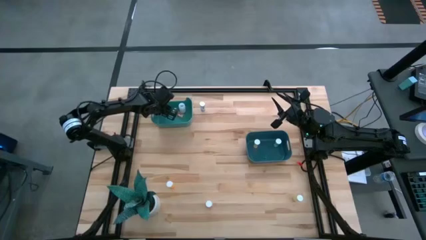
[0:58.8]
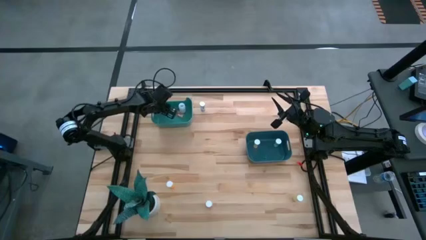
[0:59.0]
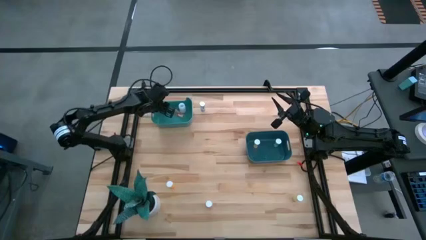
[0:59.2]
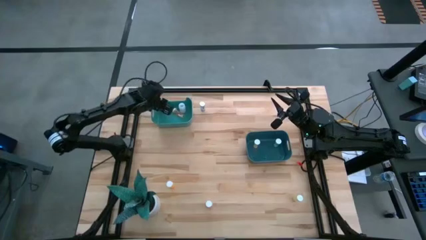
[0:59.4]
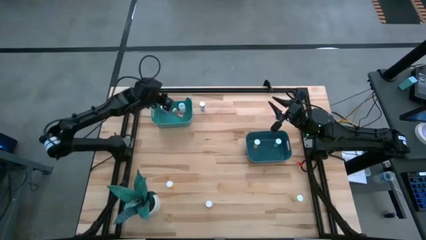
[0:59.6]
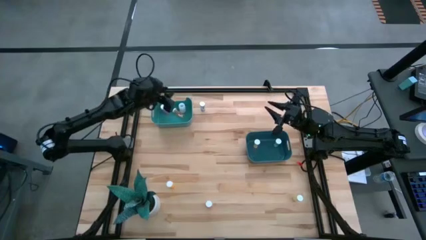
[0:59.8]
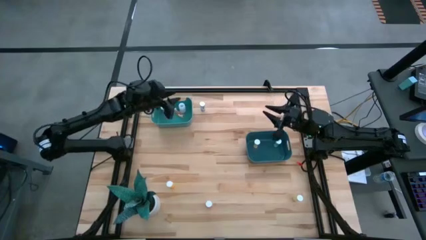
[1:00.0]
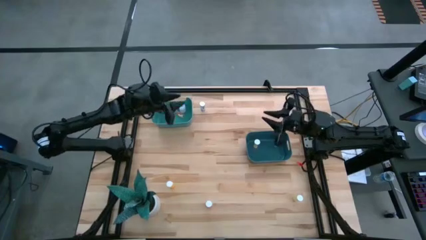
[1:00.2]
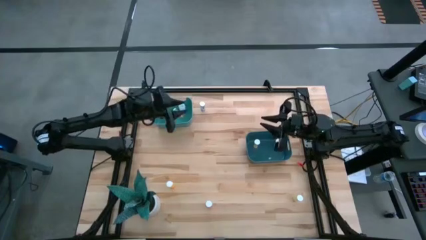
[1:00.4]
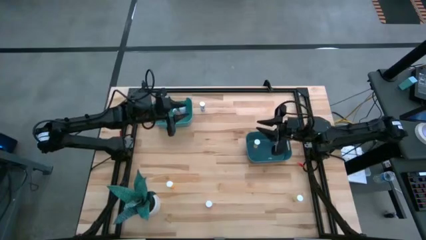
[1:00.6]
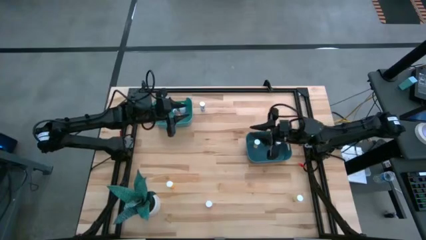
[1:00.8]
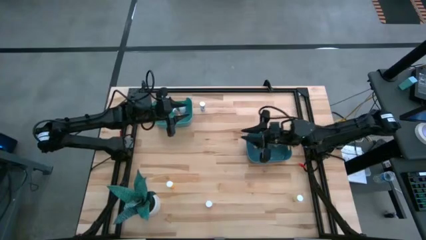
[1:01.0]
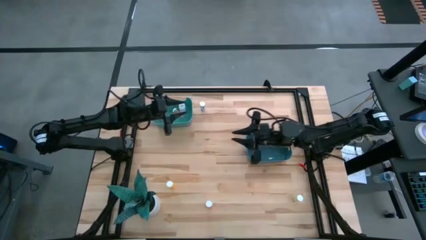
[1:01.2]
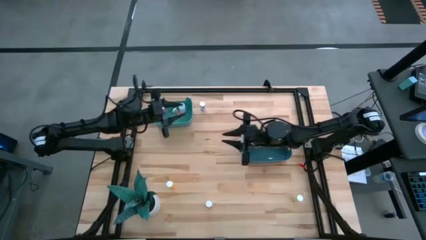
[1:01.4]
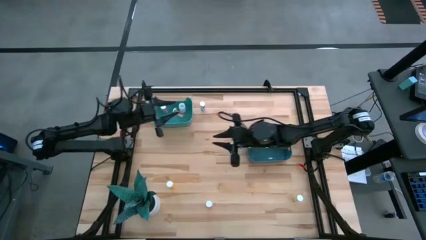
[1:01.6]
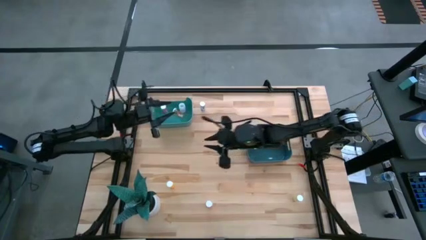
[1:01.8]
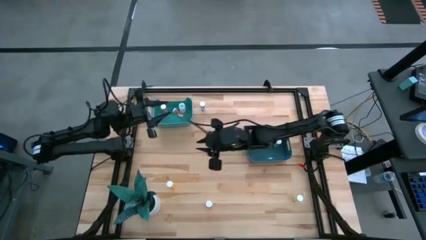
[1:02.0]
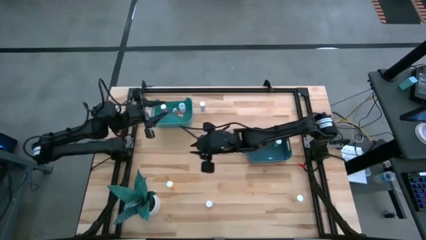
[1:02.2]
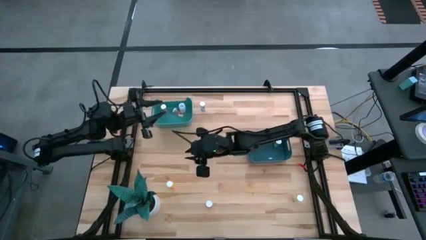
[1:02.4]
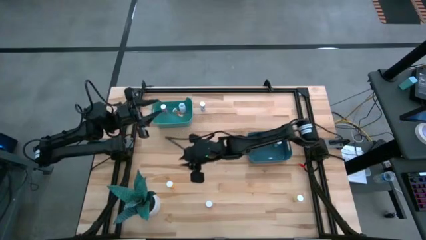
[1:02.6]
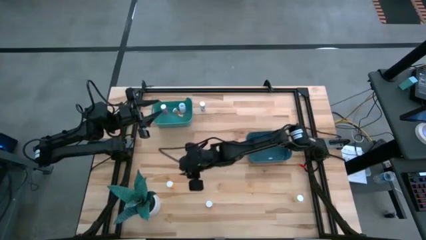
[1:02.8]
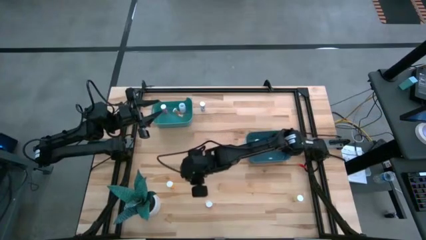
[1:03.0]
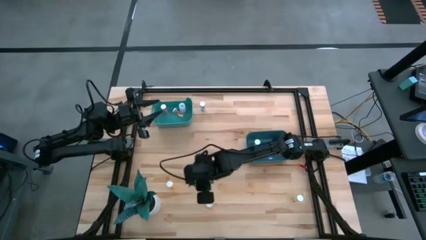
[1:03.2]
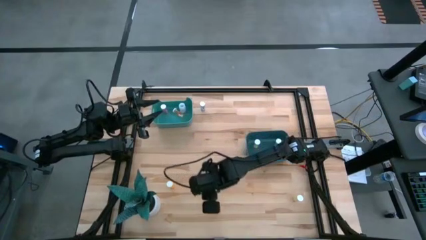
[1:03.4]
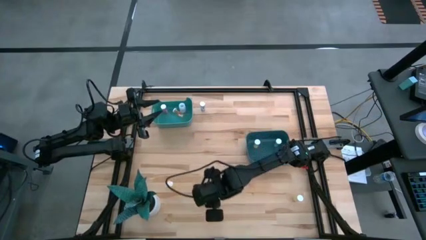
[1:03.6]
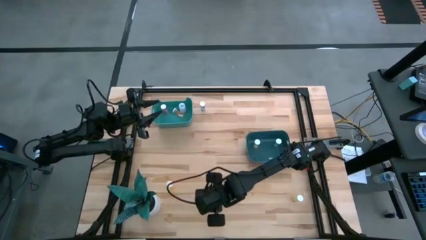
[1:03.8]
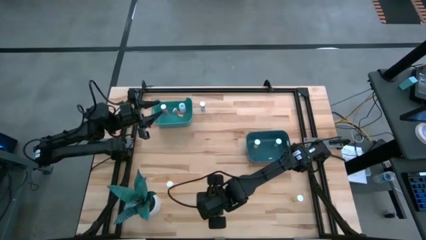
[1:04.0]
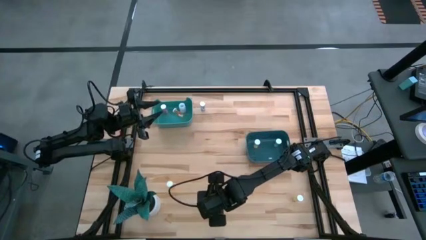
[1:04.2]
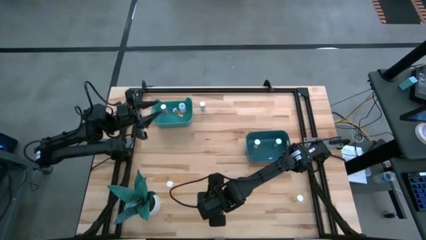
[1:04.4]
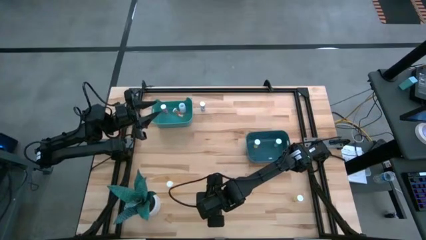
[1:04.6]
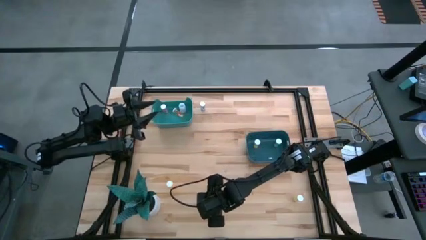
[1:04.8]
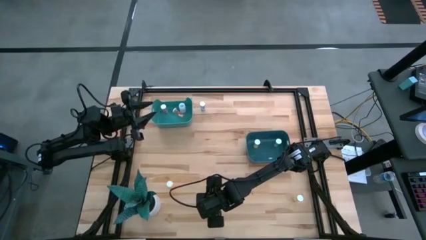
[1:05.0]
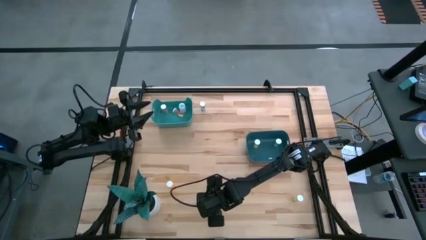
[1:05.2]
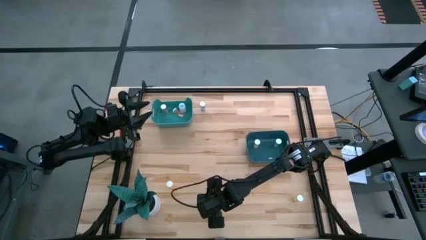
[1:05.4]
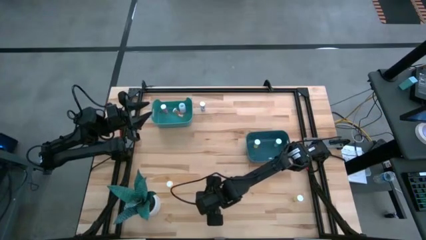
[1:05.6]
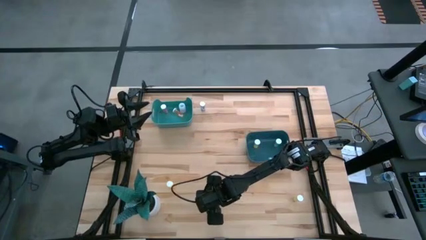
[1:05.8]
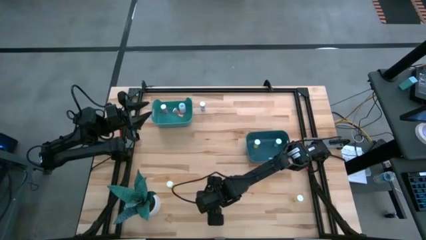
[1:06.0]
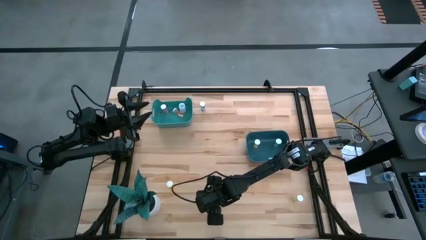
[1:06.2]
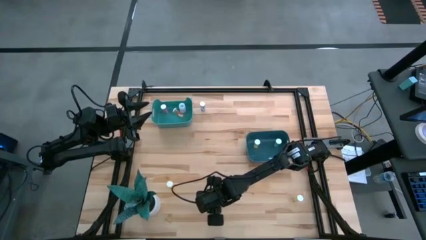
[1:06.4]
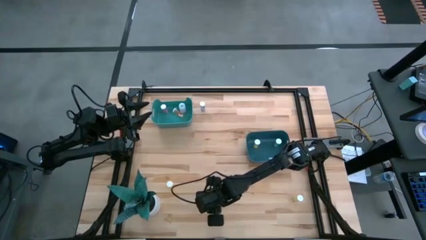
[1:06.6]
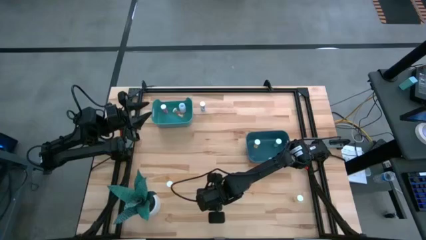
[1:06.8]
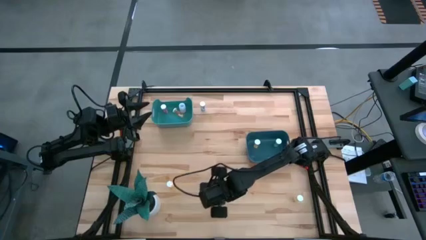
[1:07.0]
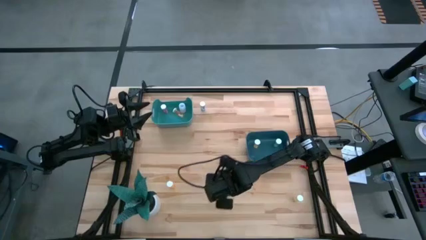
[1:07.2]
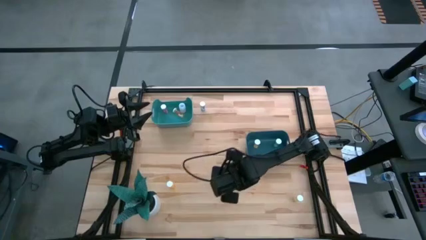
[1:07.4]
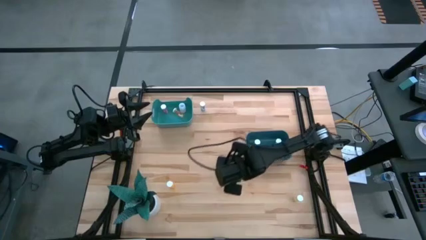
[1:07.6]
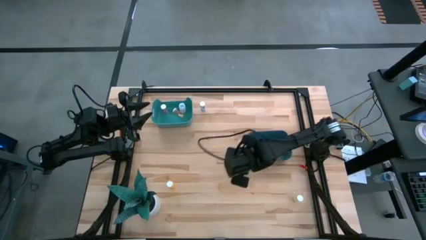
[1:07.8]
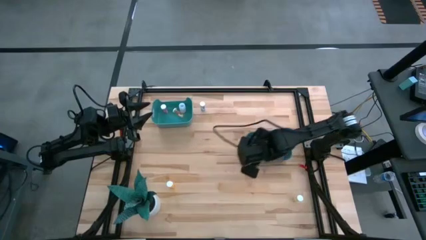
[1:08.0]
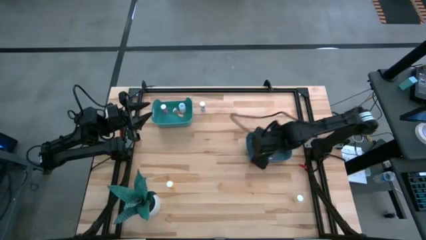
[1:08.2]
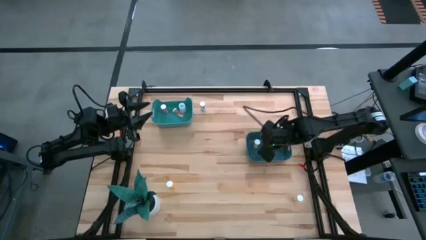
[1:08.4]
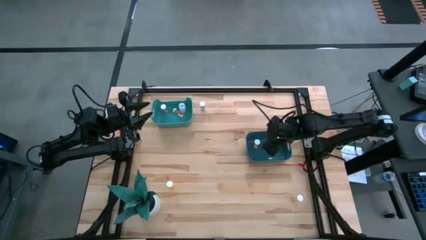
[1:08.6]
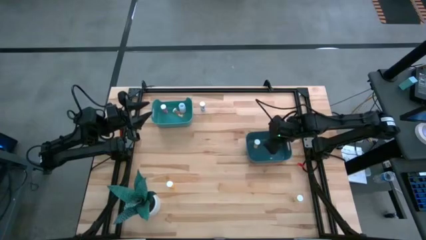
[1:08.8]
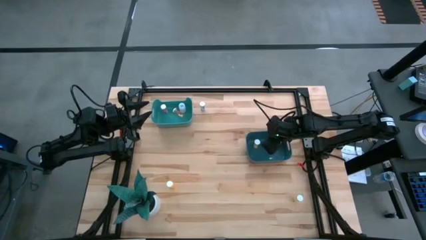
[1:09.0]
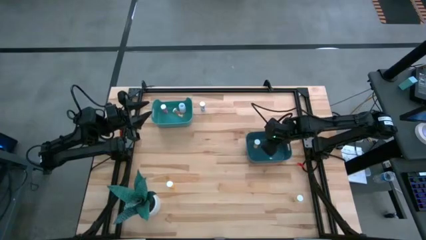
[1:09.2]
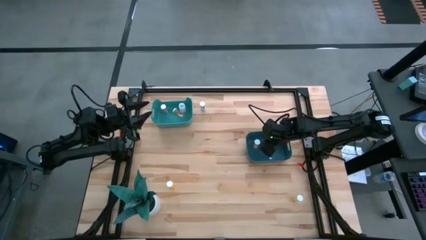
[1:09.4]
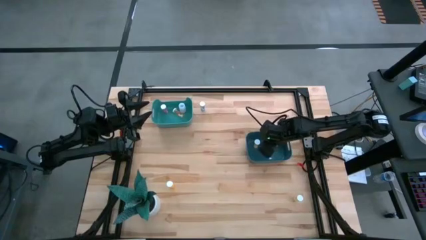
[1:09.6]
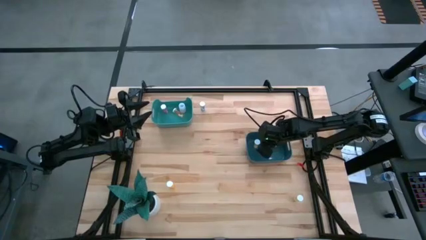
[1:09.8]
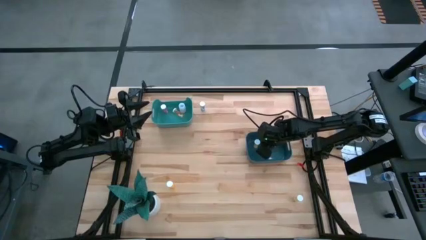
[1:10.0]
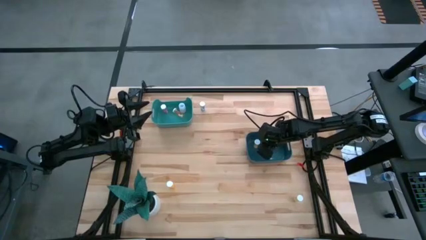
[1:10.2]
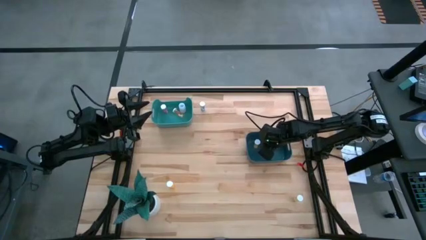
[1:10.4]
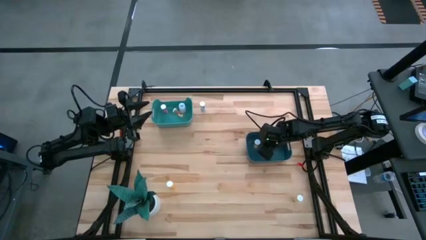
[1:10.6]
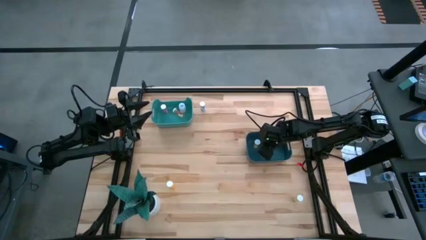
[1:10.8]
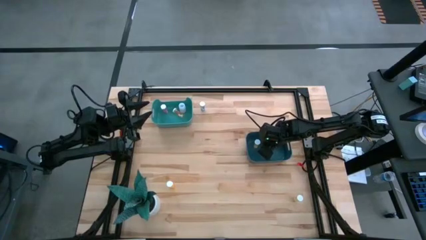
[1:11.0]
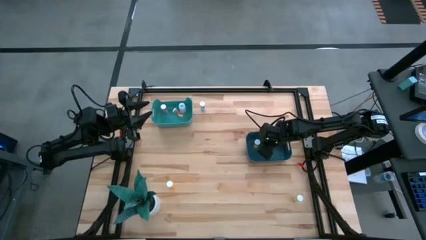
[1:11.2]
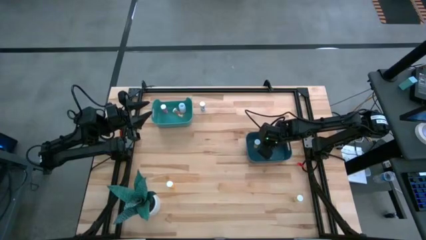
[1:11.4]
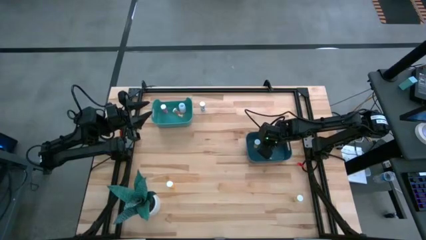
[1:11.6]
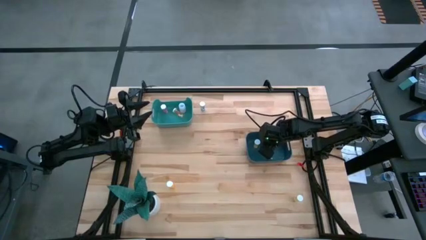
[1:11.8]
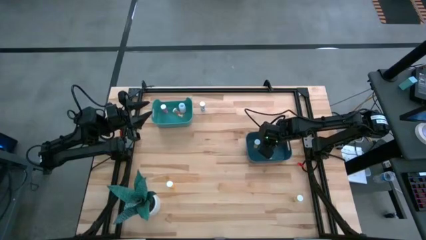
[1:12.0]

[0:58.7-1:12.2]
Task: Pick and place medicine bottles into bin by pill shape (circle, oval)
Put the pink tablet bottle into the blue bin
